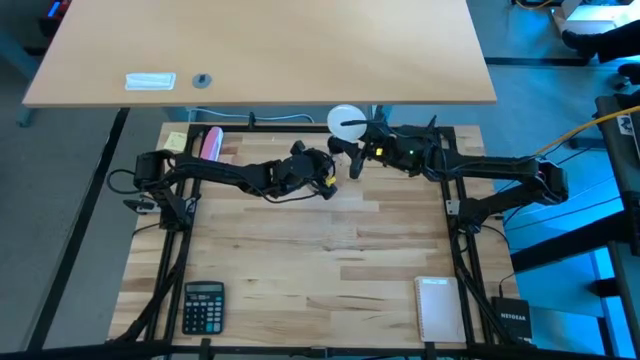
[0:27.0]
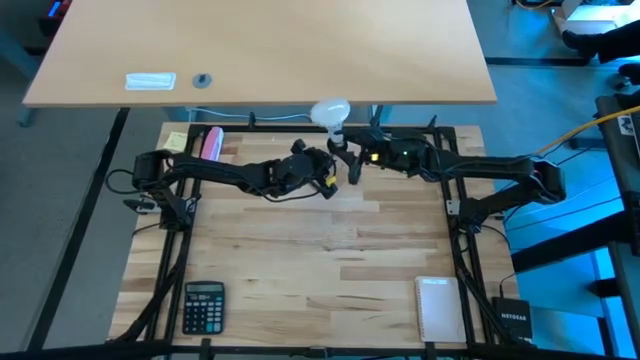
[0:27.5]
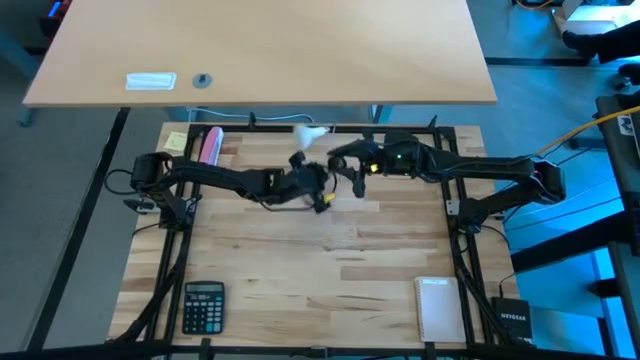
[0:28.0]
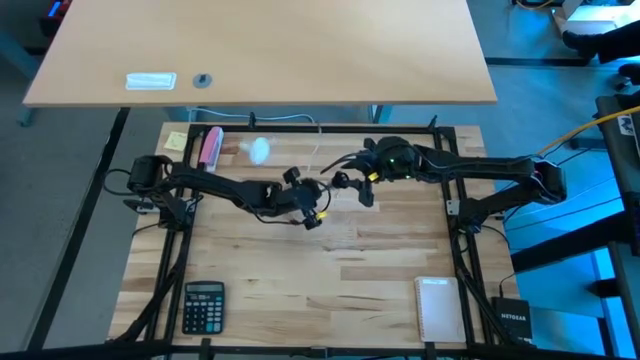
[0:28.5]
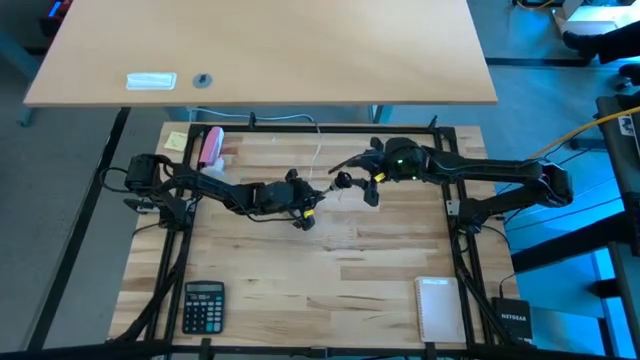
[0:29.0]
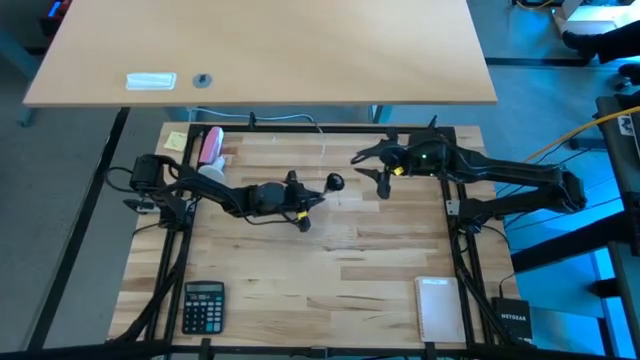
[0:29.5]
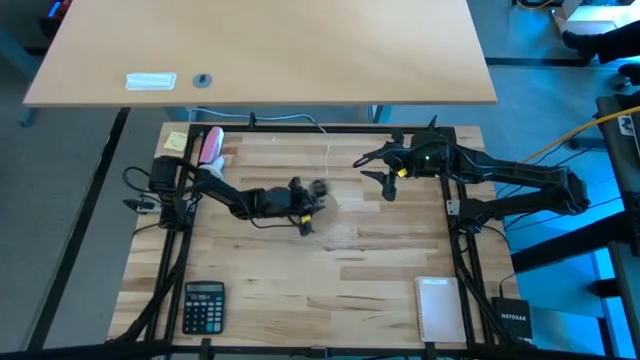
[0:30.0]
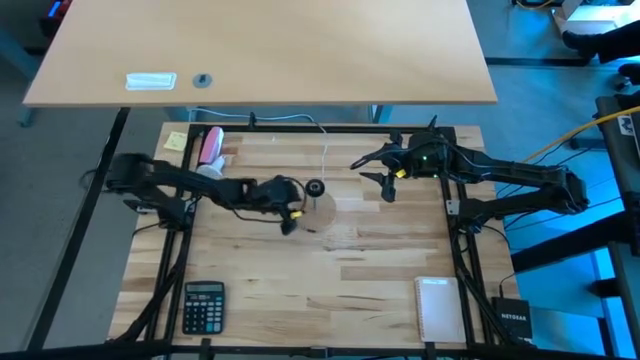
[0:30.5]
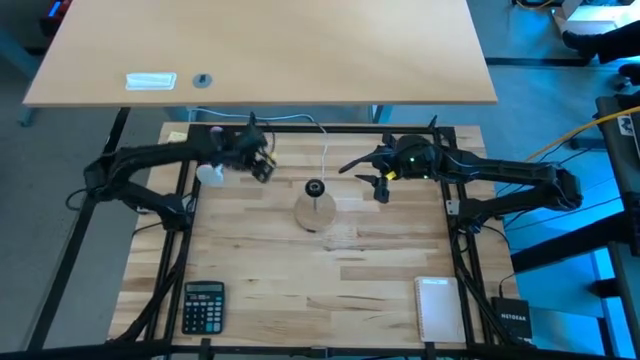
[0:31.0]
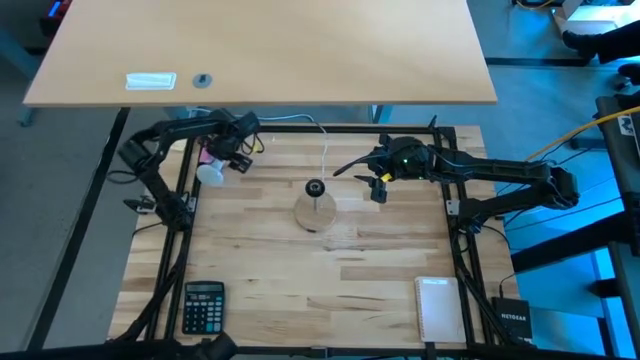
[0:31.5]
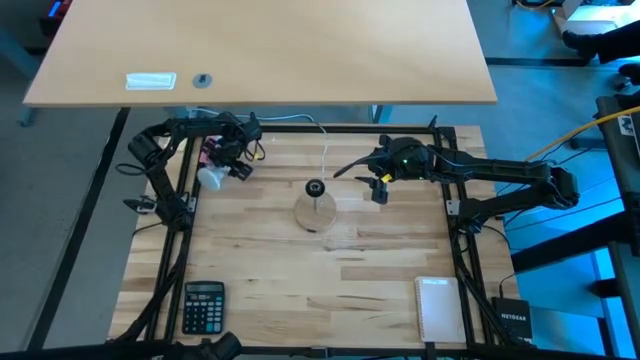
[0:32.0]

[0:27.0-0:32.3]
Task: Screw lightbulb
Insert the white lightbulb into the lamp

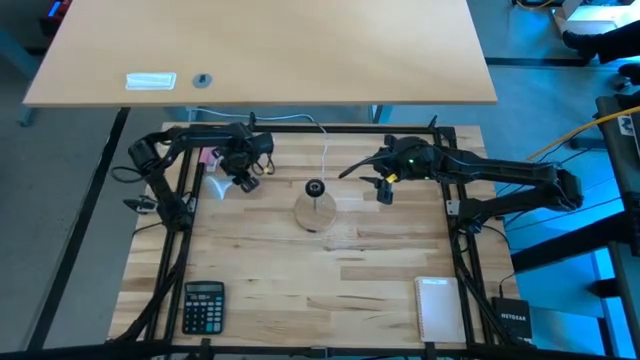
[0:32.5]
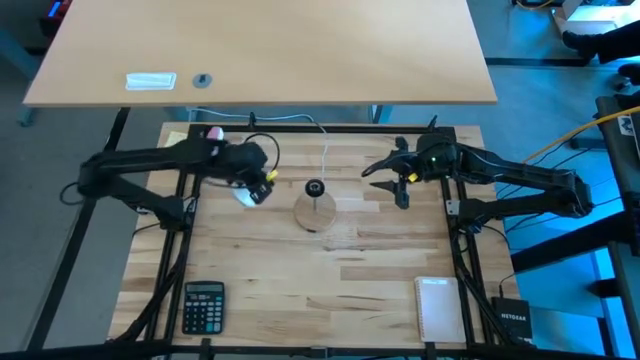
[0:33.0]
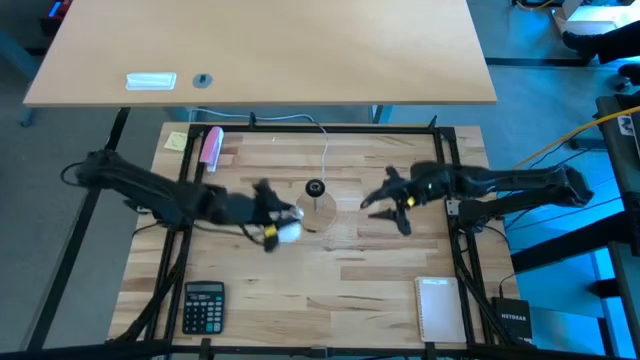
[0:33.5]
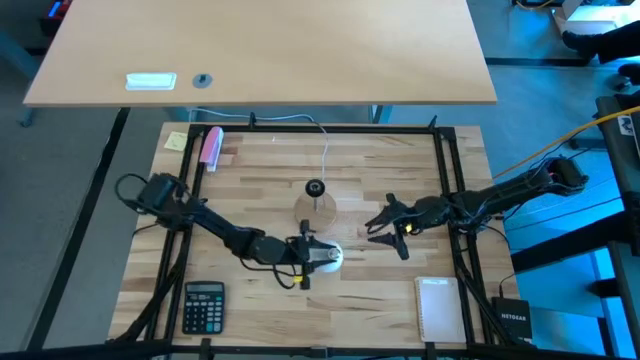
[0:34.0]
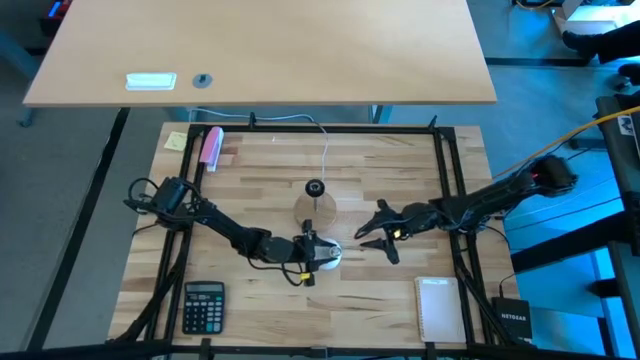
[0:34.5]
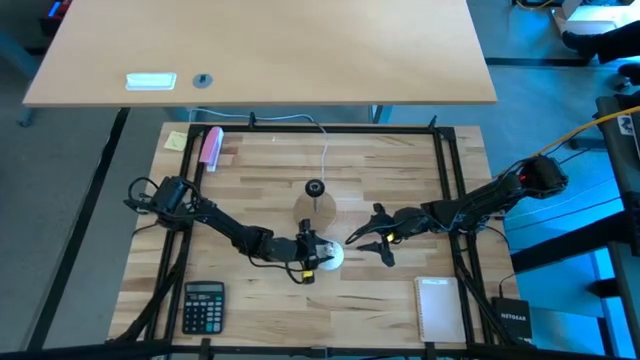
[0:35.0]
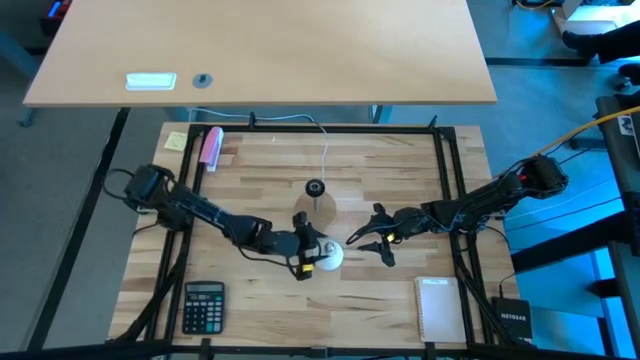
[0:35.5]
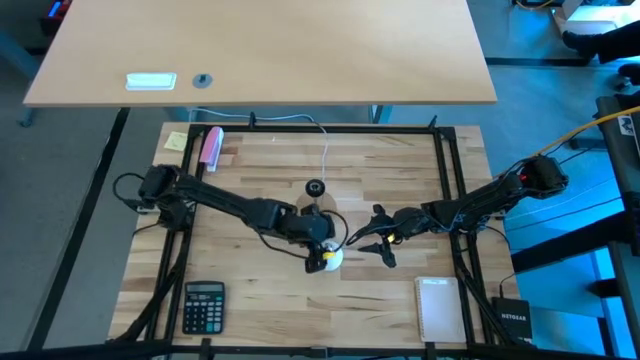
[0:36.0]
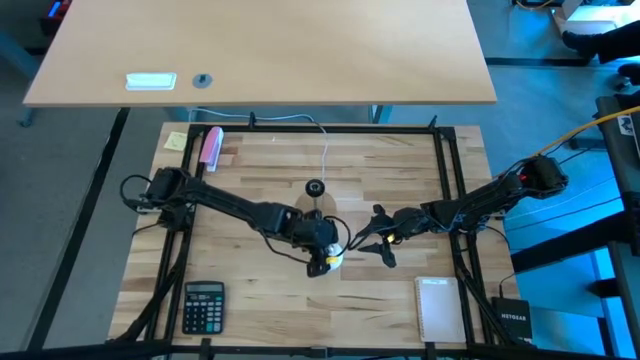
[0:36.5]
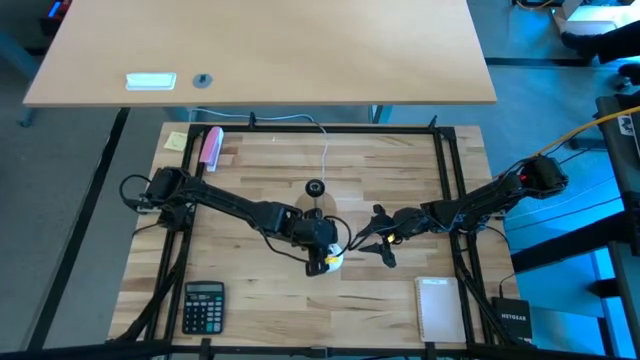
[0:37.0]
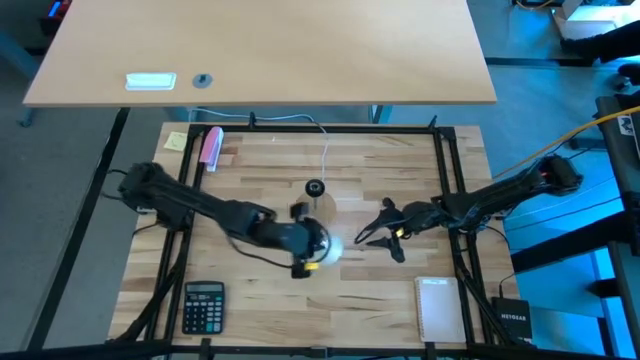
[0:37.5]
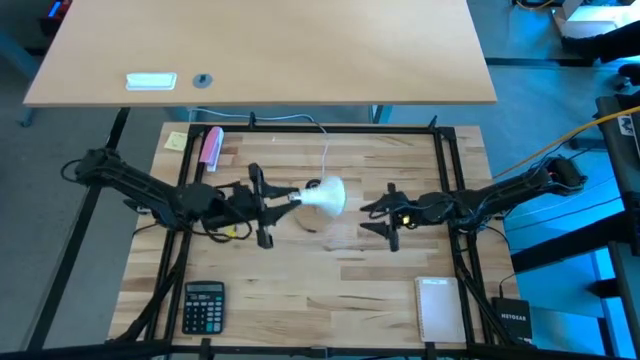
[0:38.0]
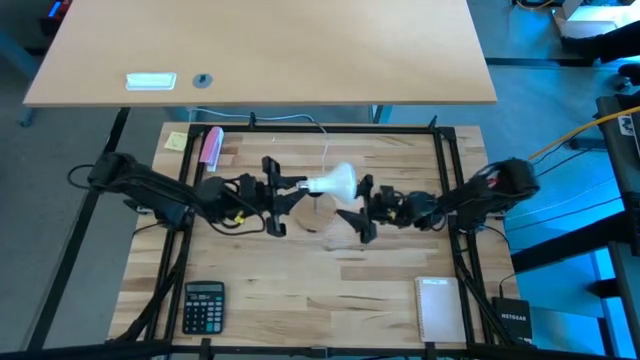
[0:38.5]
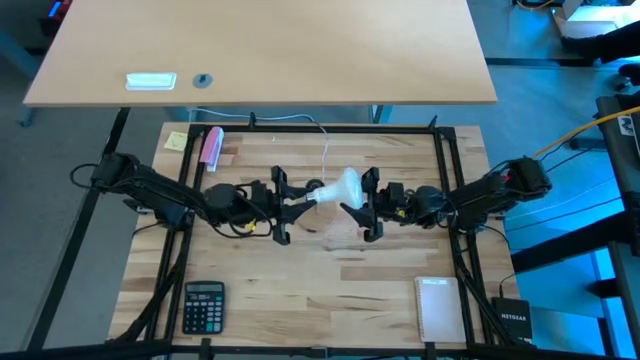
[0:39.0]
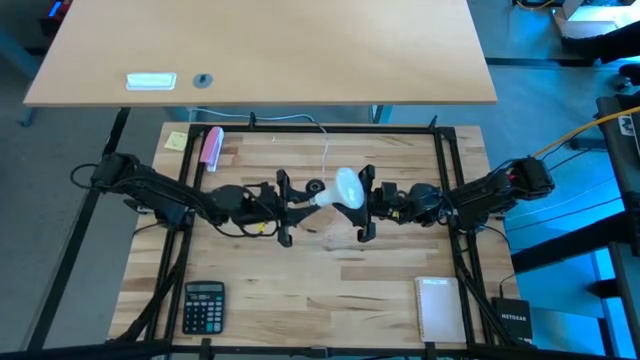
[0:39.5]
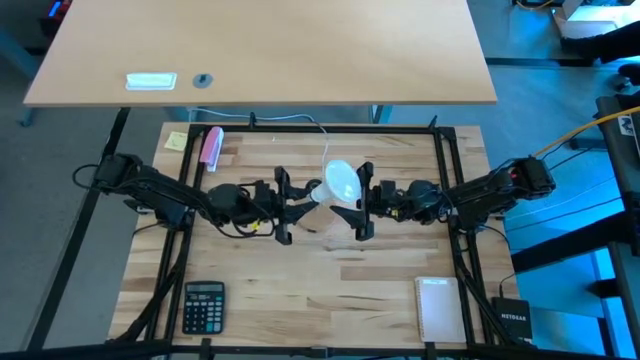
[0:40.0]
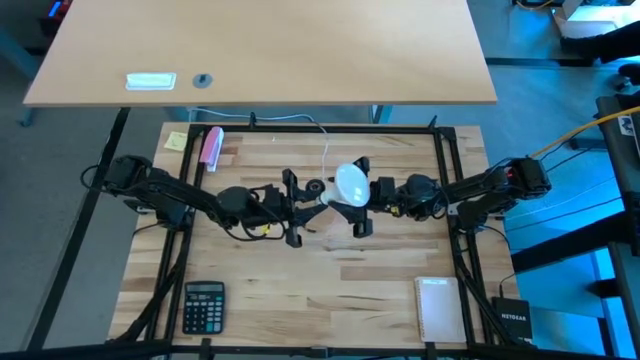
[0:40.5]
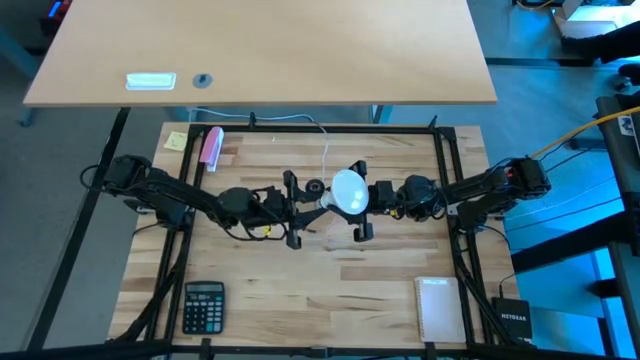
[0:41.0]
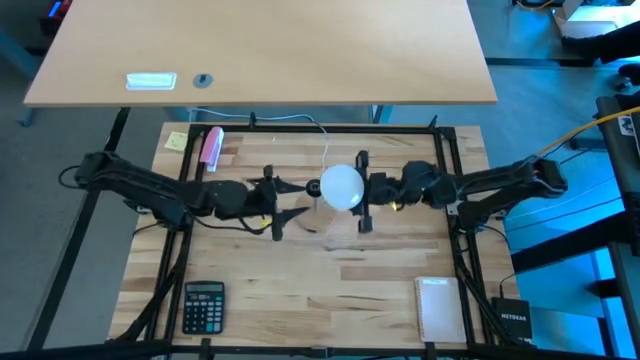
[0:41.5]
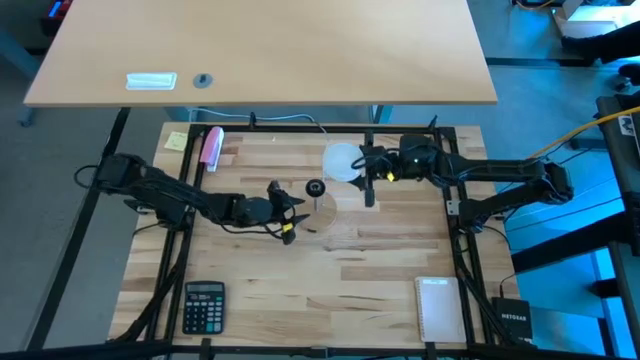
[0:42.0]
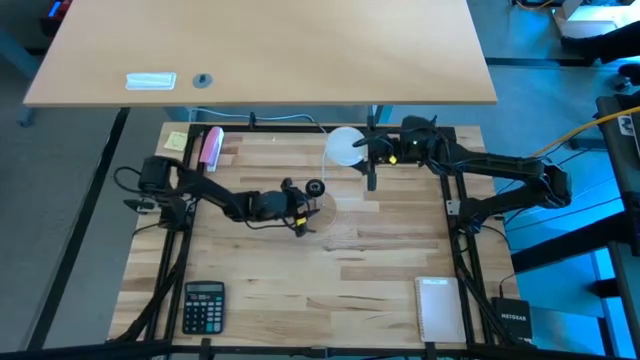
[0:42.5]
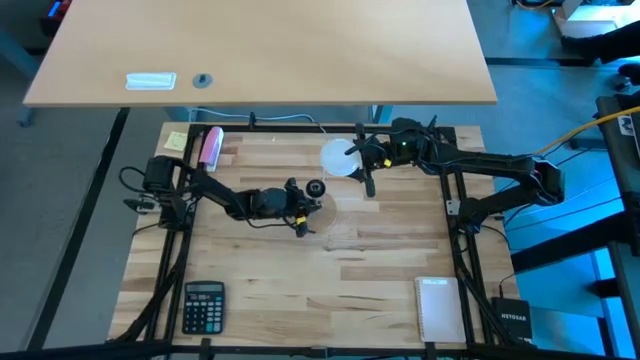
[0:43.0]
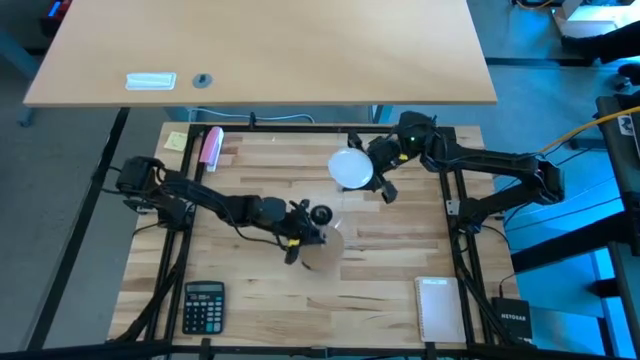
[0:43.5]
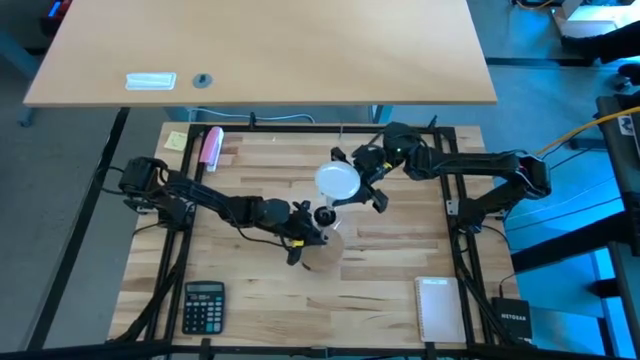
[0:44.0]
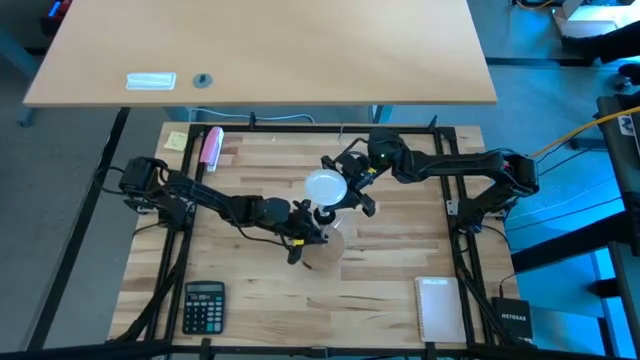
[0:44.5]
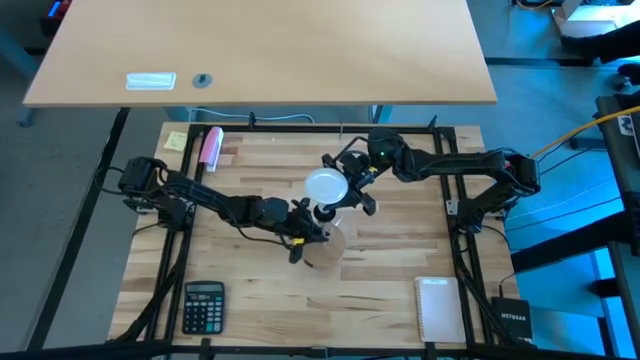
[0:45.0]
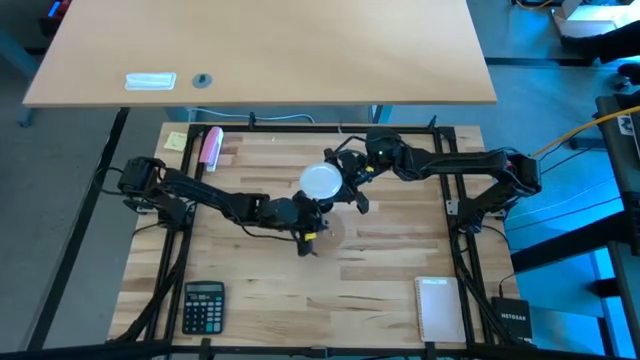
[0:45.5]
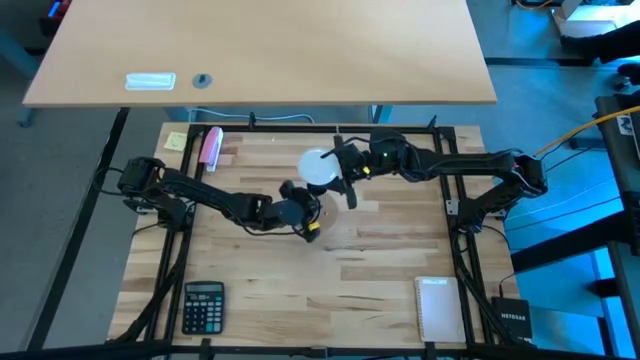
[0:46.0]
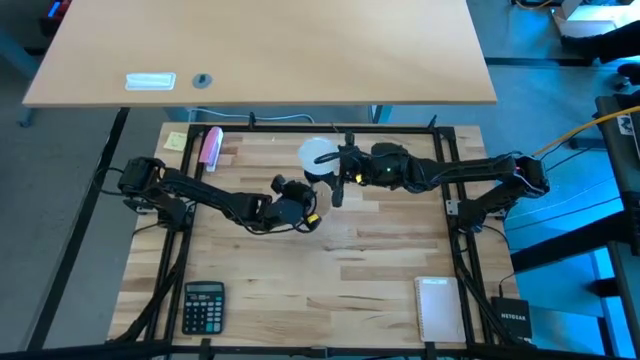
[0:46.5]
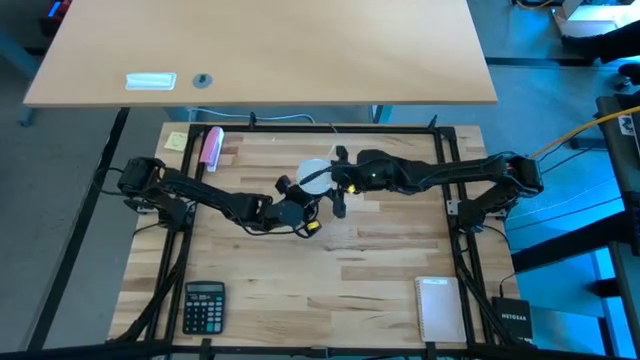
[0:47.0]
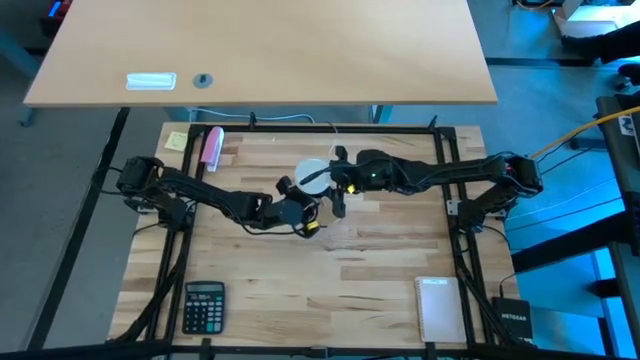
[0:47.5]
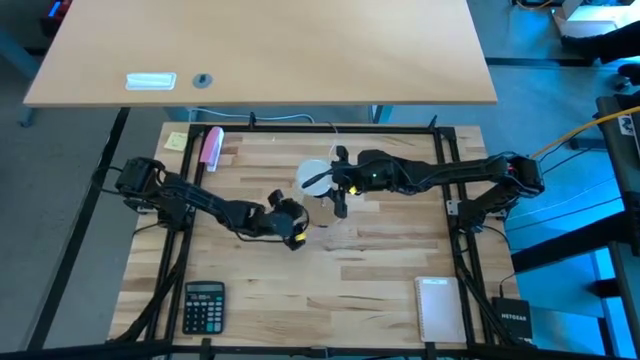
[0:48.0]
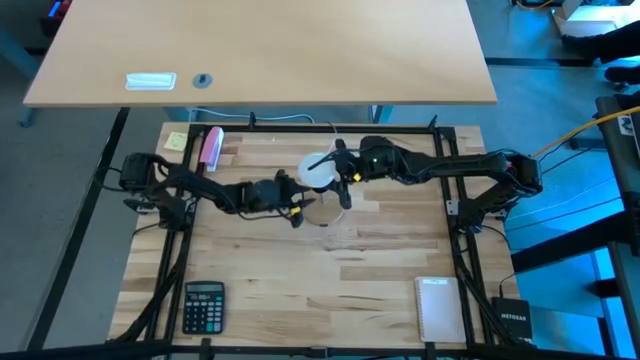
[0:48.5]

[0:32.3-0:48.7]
Insert the white lightbulb into the lamp
